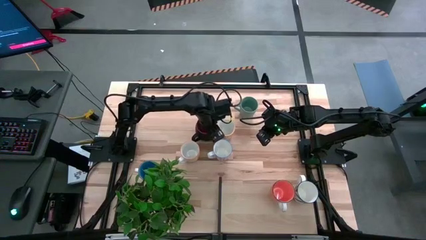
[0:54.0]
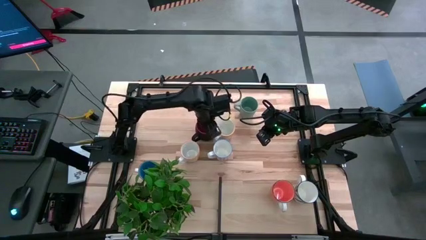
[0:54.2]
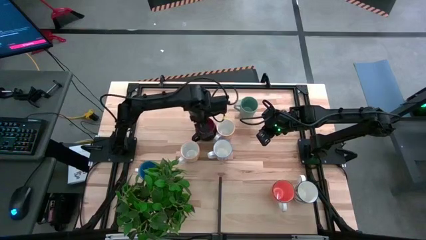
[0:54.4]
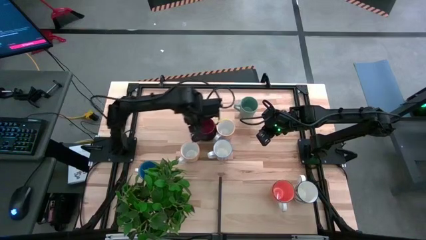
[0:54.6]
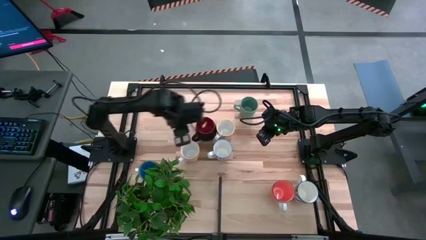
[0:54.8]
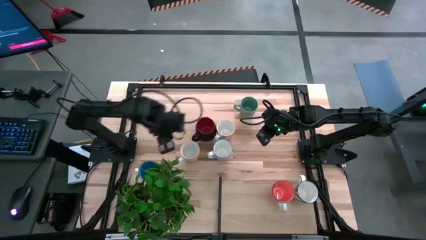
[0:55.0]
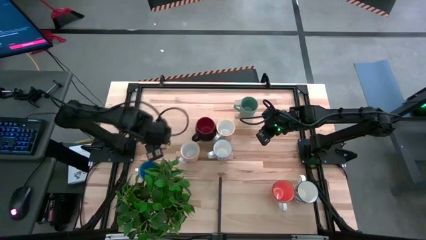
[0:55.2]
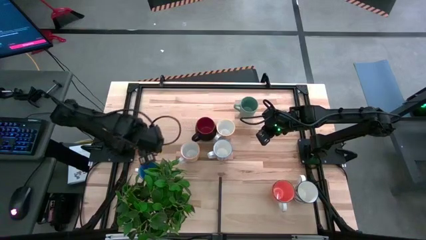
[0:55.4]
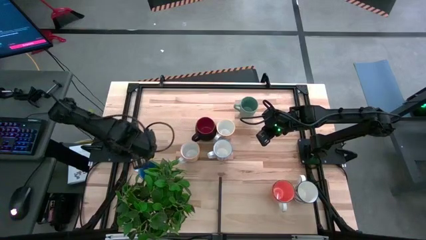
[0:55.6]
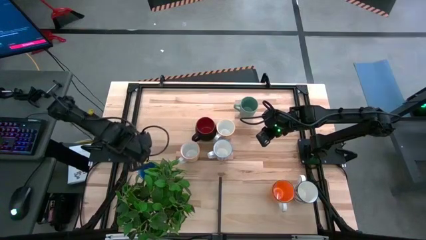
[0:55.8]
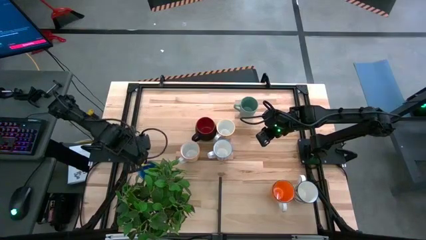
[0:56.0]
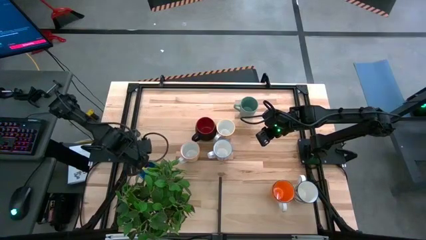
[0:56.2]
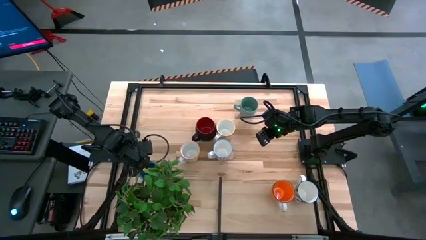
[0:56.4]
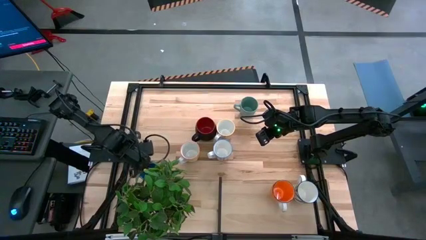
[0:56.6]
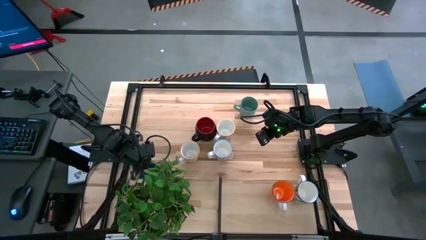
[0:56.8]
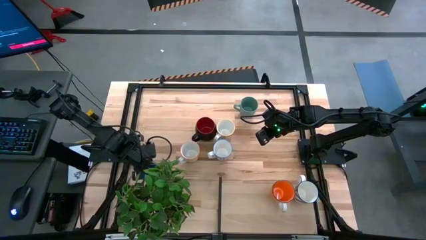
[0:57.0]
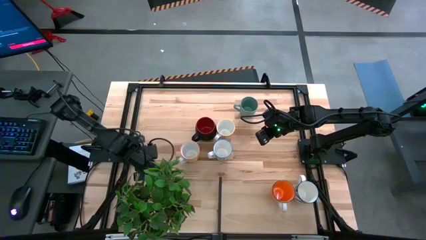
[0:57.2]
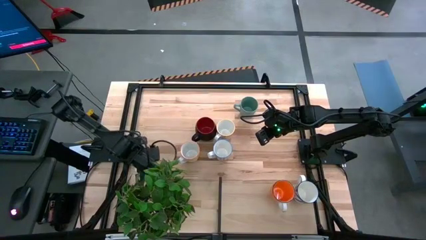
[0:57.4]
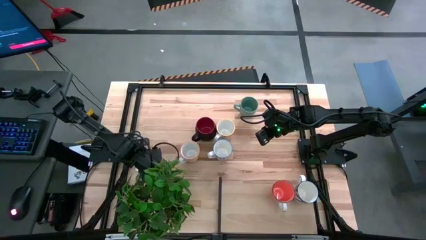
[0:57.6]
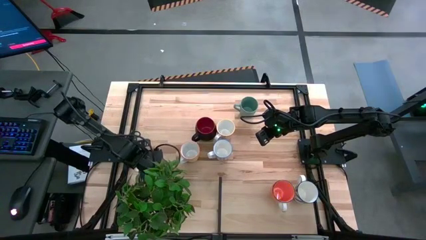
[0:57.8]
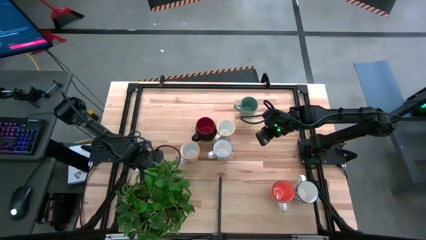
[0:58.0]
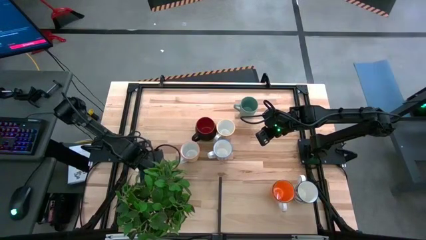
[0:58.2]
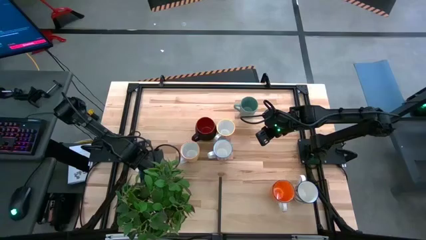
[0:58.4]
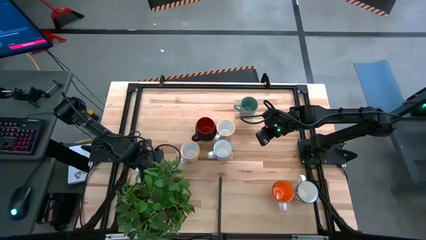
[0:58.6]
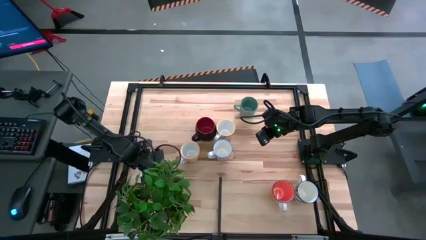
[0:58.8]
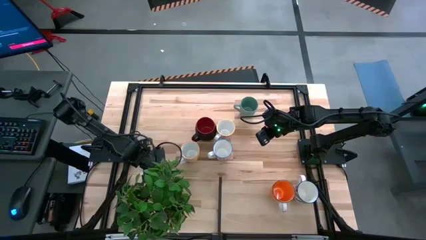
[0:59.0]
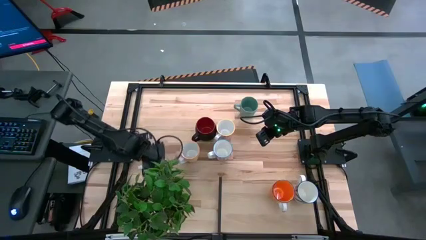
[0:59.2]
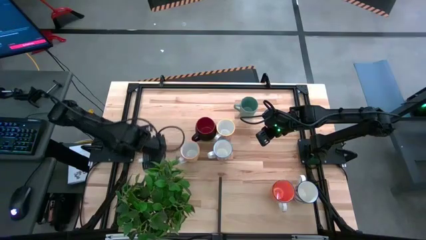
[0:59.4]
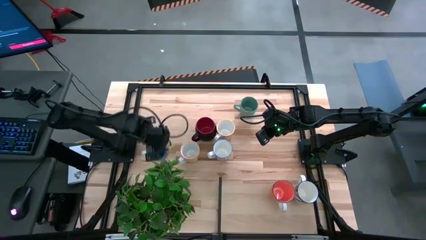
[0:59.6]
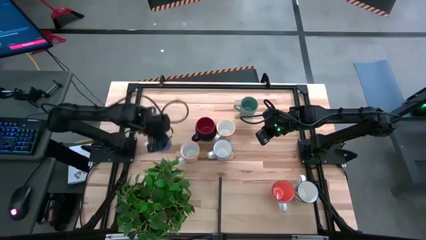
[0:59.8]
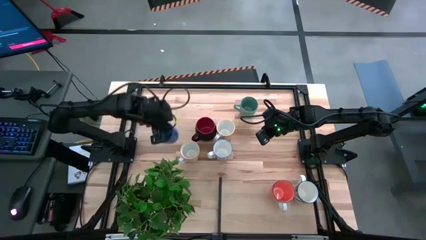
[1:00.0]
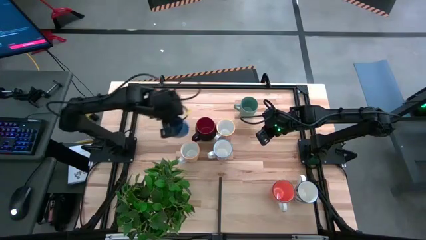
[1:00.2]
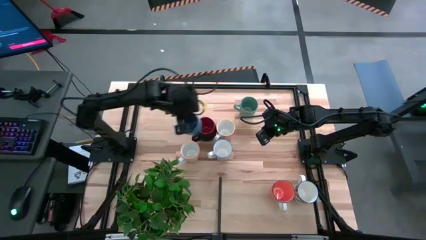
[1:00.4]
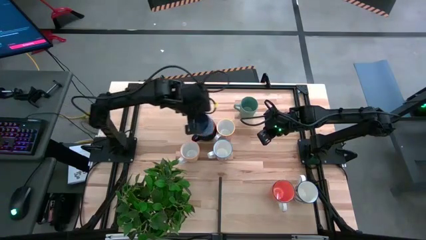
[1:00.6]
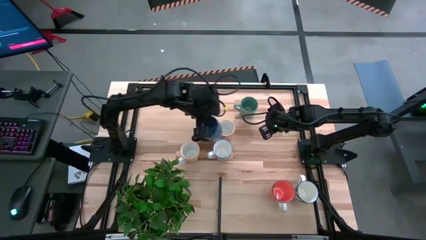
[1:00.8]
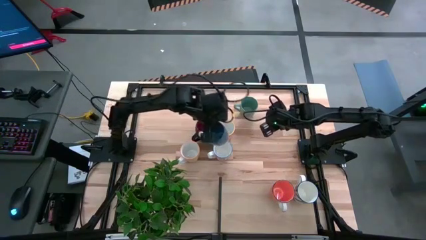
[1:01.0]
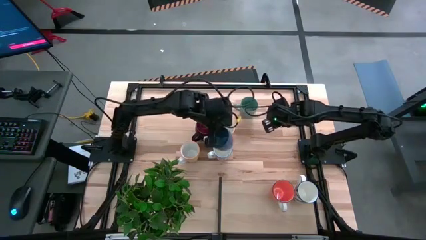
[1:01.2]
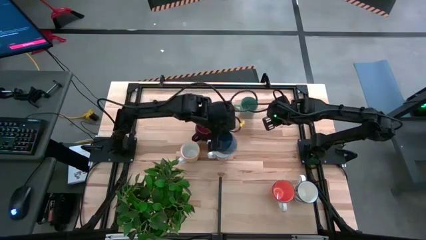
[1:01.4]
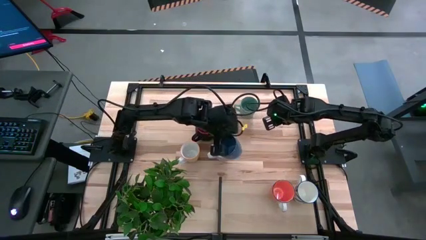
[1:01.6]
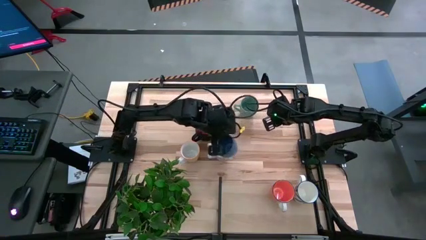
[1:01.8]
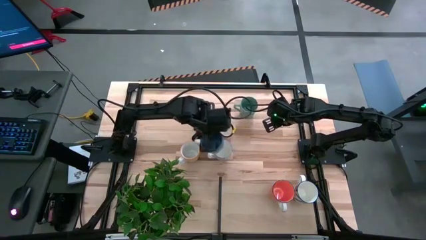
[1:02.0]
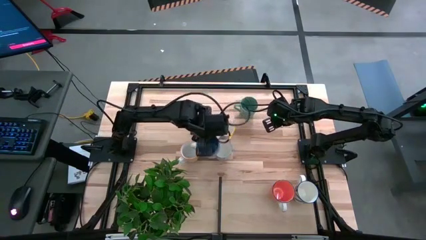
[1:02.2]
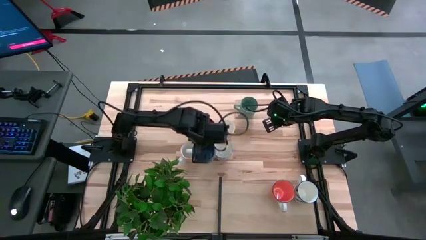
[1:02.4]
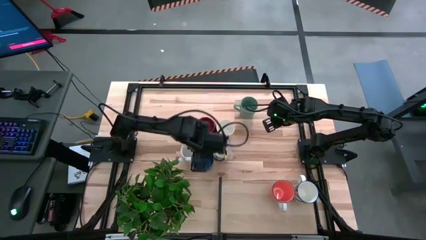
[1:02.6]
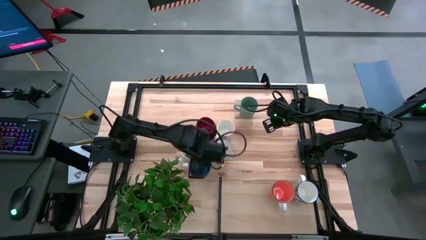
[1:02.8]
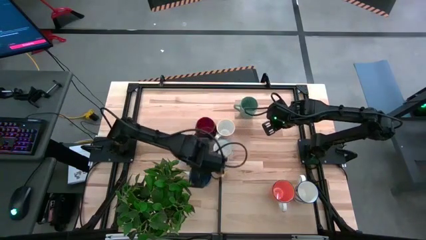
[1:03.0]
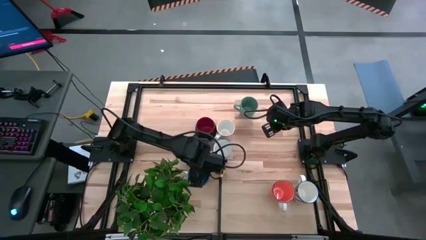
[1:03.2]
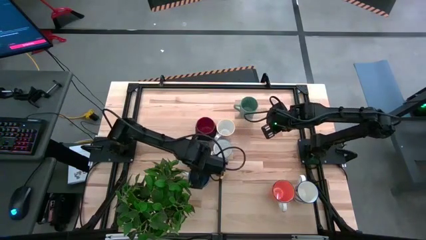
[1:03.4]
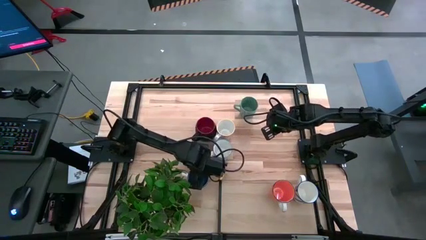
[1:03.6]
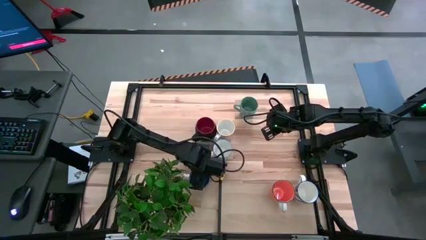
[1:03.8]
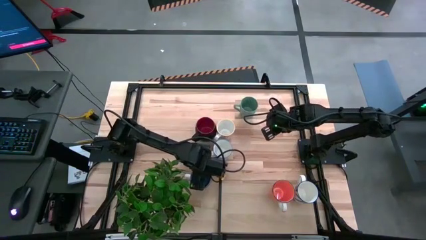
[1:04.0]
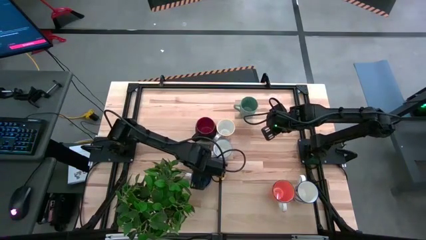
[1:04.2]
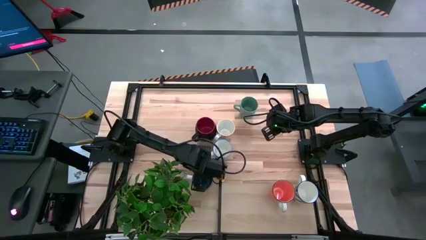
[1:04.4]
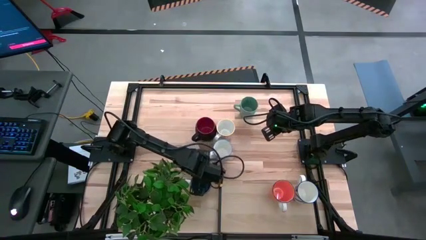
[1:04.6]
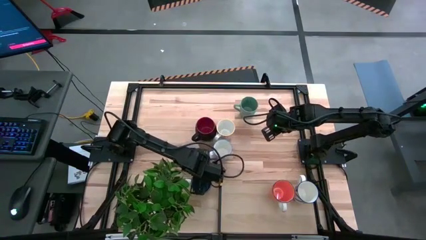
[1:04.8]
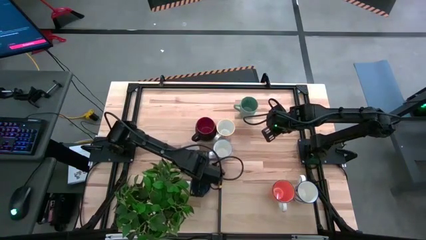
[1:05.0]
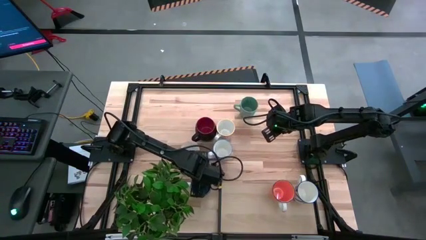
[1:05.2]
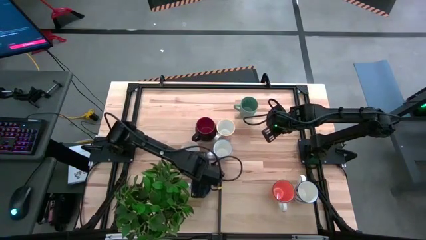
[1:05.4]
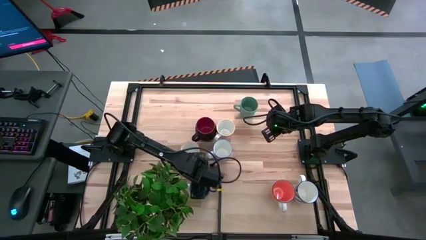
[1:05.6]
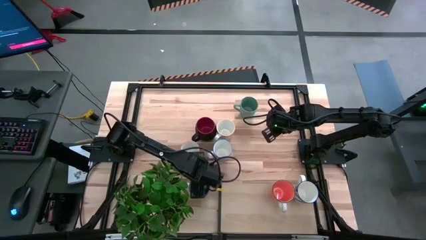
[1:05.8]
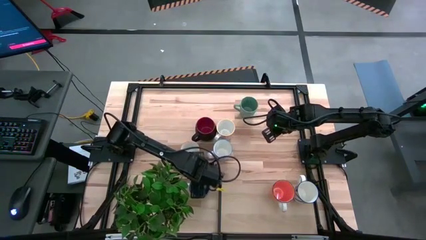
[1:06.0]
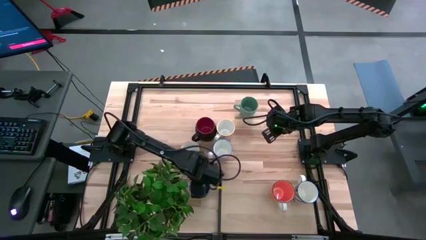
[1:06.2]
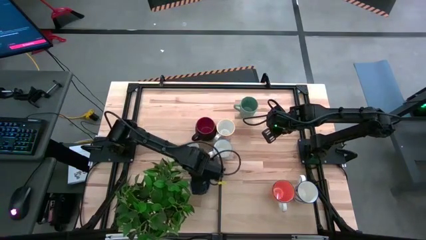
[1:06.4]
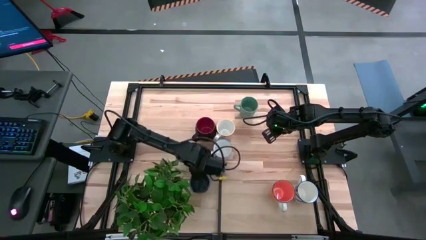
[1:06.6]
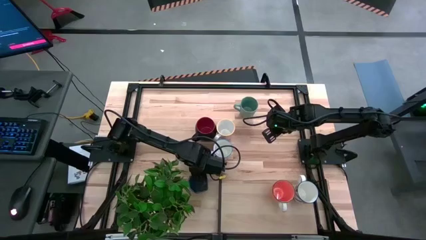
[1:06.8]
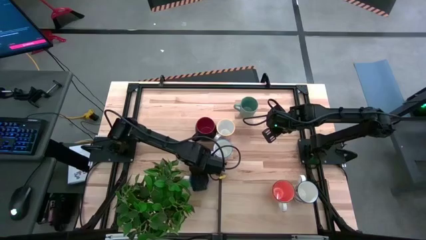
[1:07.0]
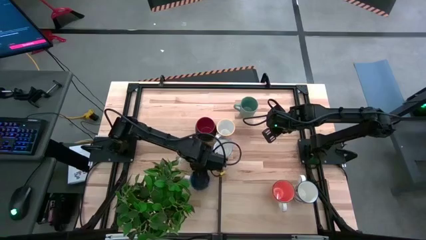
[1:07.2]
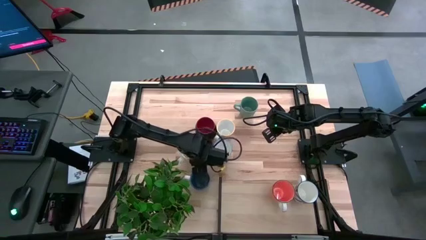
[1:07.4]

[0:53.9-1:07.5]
Task: Place coffee mugs
Move the blue mug to the left of the shelf

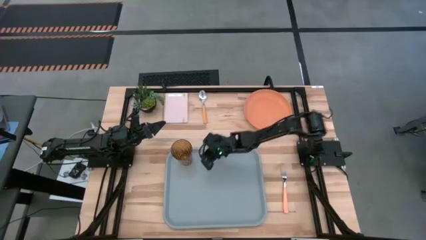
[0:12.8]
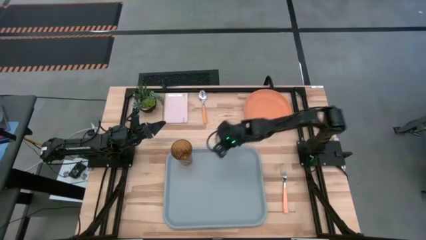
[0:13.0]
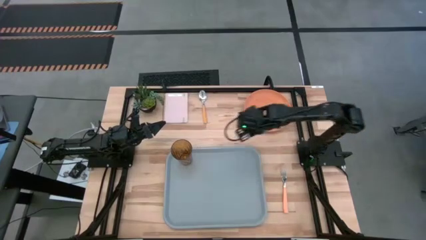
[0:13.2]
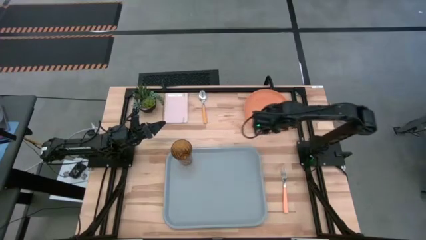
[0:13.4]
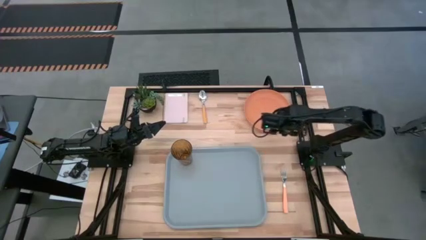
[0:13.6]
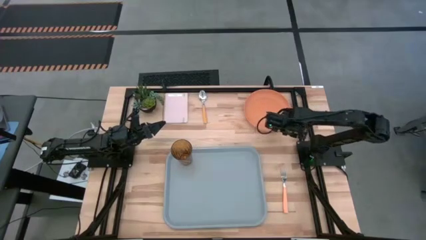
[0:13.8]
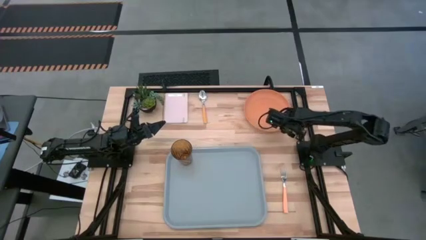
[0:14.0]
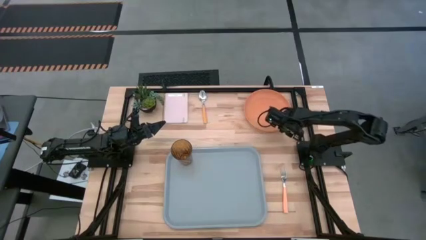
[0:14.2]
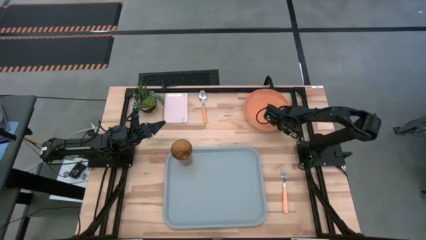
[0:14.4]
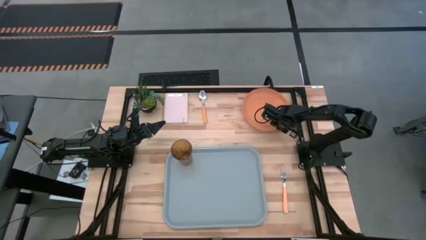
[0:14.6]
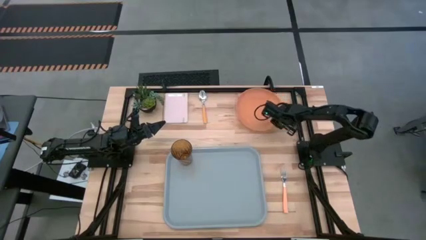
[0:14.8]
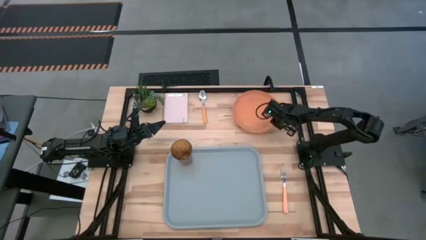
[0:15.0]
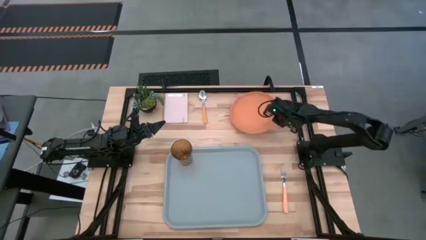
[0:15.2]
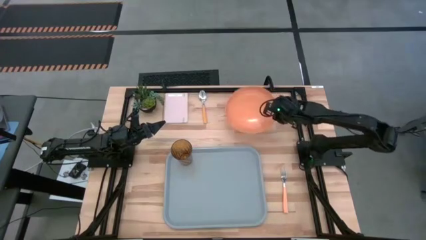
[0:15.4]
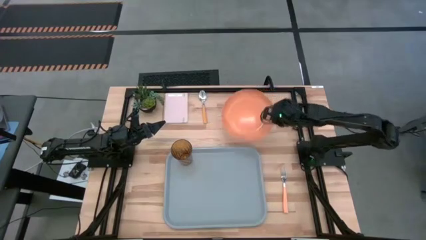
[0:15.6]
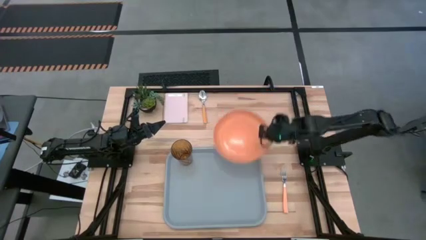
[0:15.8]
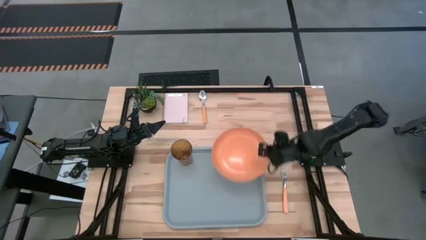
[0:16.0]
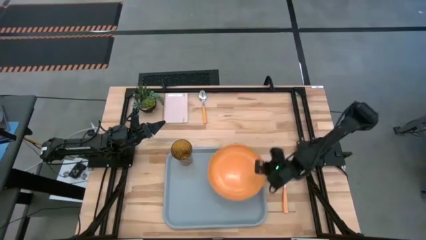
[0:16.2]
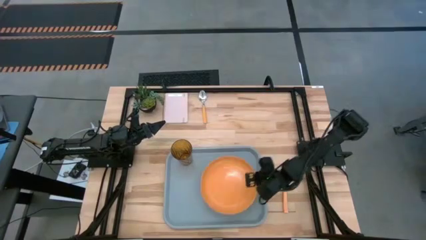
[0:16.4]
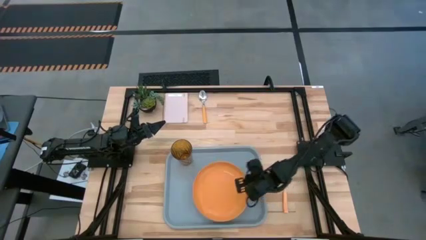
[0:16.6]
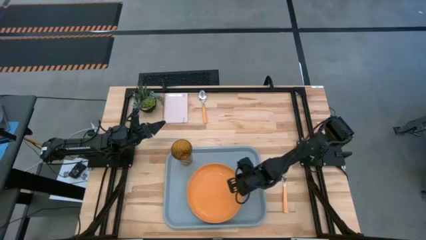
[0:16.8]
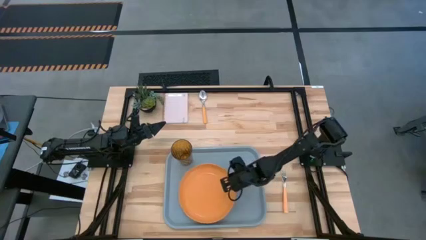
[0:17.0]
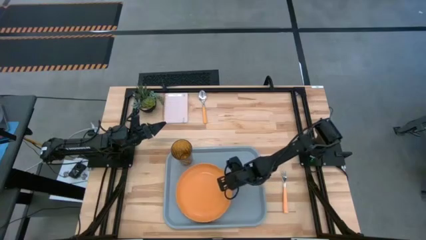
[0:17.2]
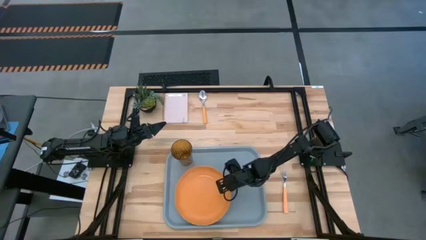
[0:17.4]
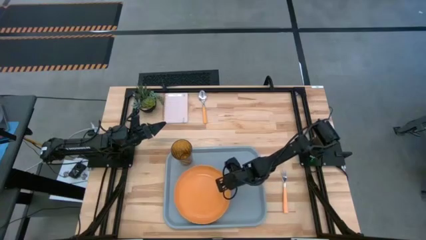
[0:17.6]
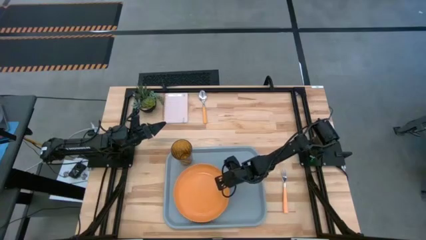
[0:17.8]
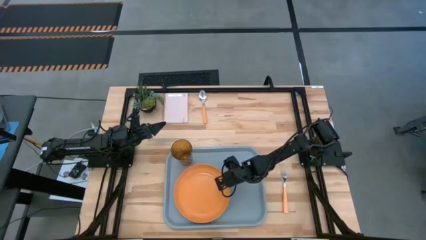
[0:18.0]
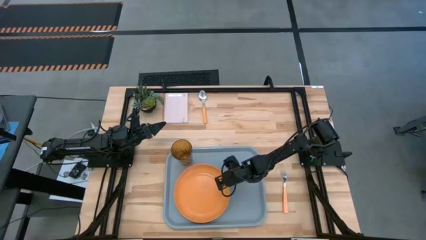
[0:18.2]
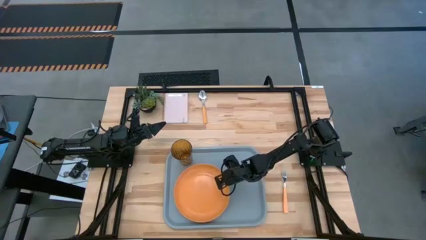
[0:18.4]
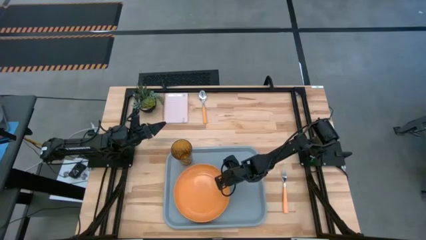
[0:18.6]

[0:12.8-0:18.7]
Task: Pick and place plate/cup/fork/spoon on tray
Put the orange plate on the gray tray
